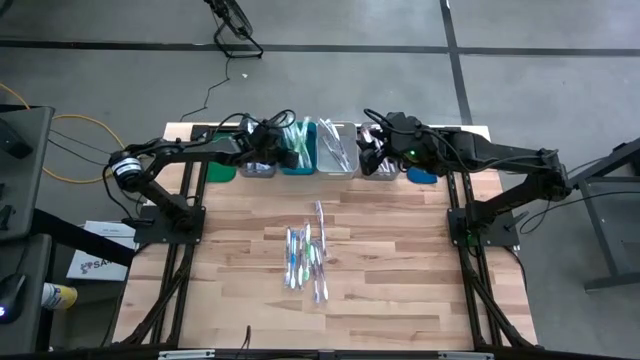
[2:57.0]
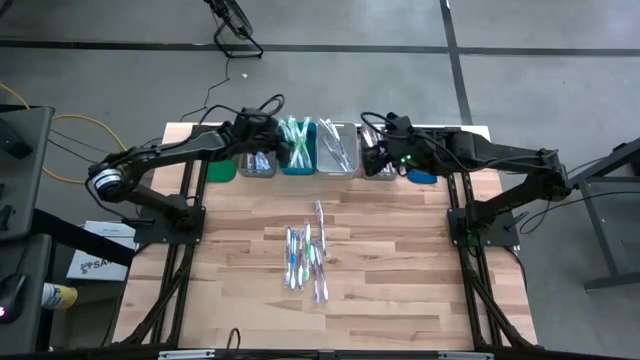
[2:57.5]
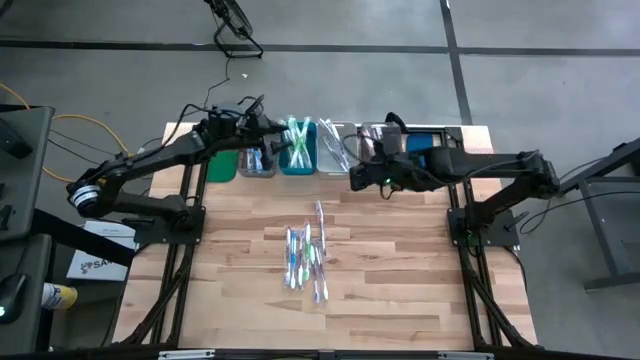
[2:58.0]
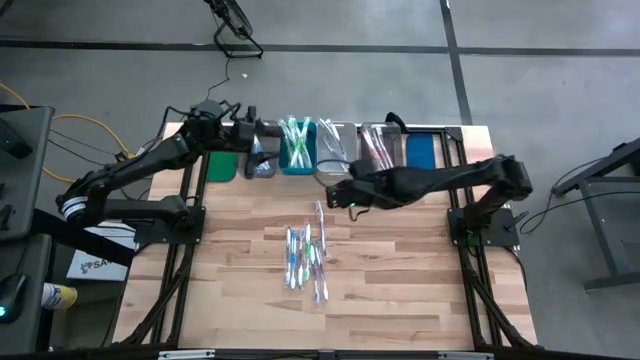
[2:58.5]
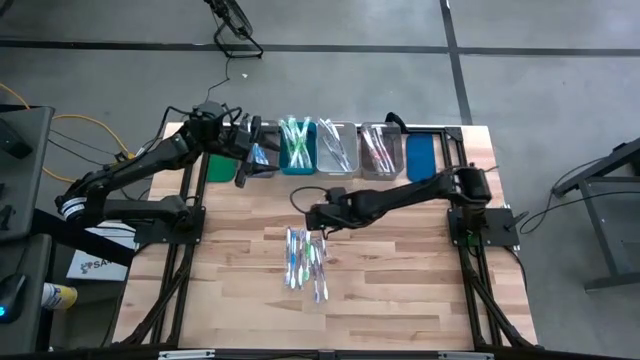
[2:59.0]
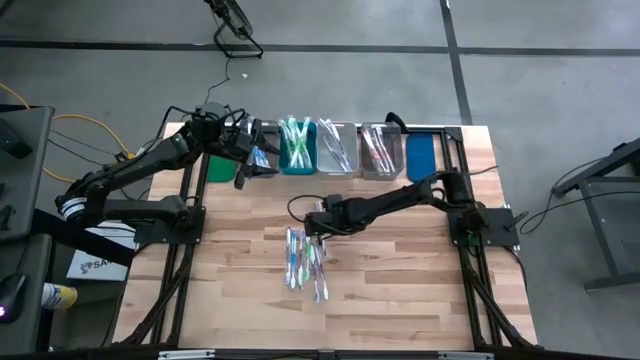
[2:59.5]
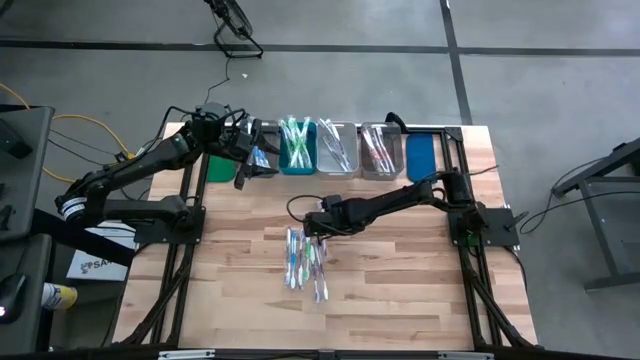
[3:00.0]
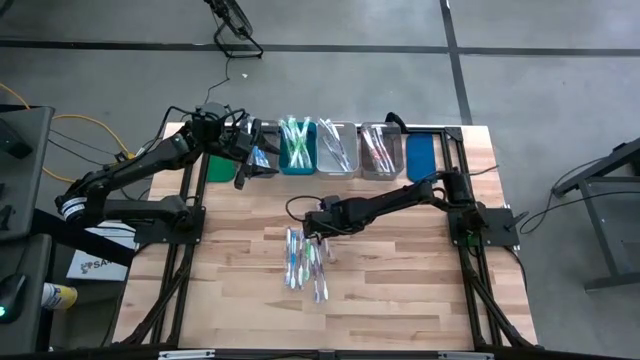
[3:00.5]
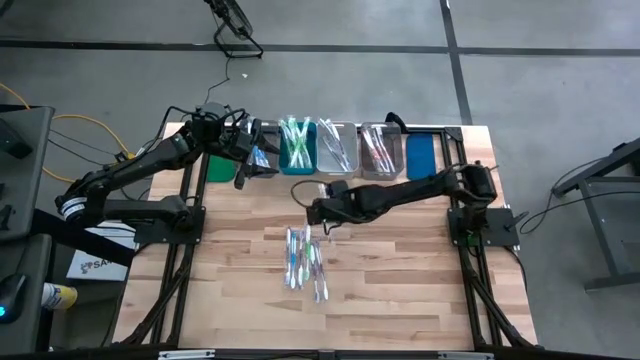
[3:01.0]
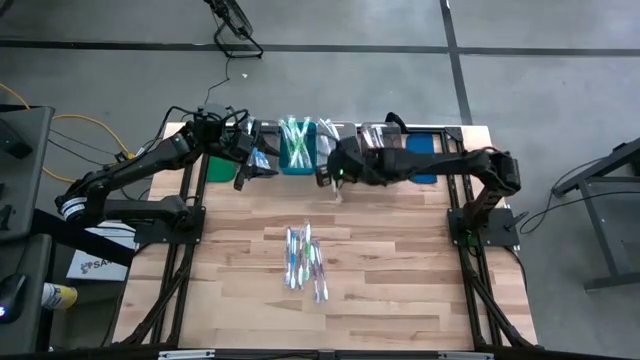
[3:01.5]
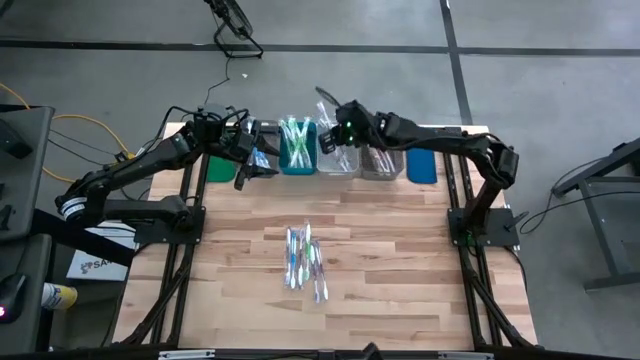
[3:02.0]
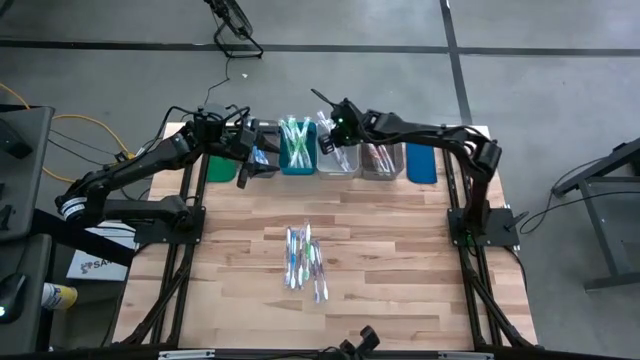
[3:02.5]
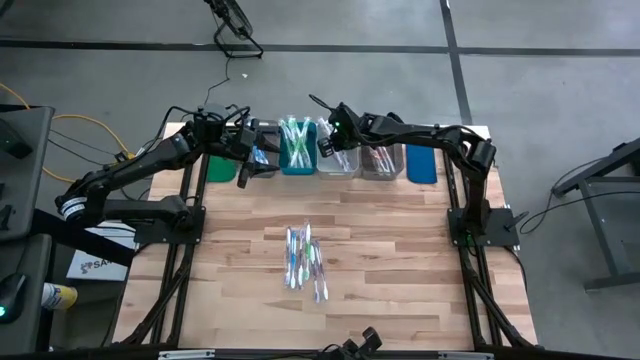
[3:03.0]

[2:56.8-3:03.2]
Task: Pick & Place Toothbrushes
Put the purple toothbrush into the white bin

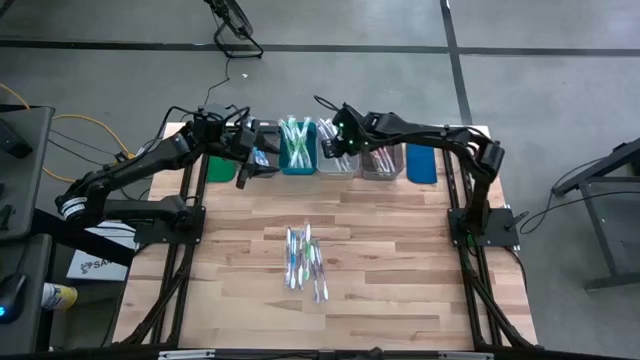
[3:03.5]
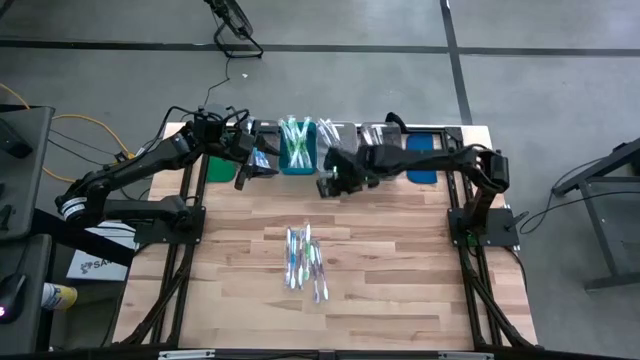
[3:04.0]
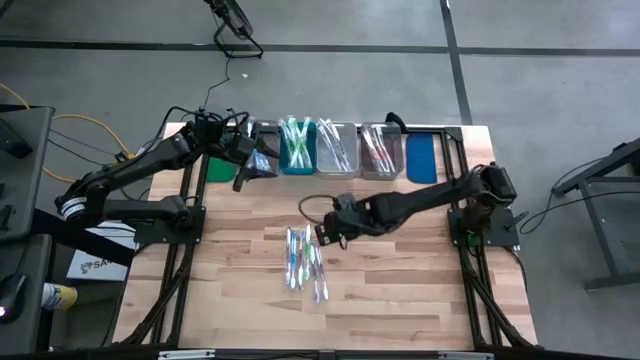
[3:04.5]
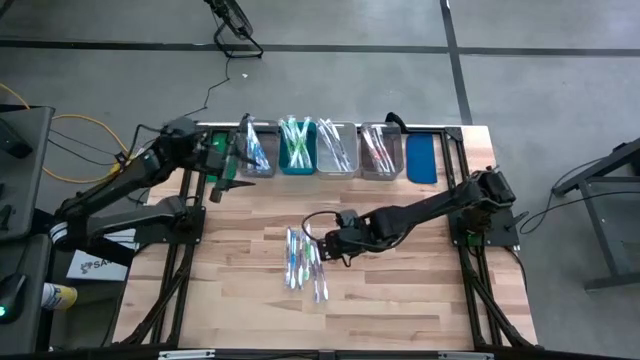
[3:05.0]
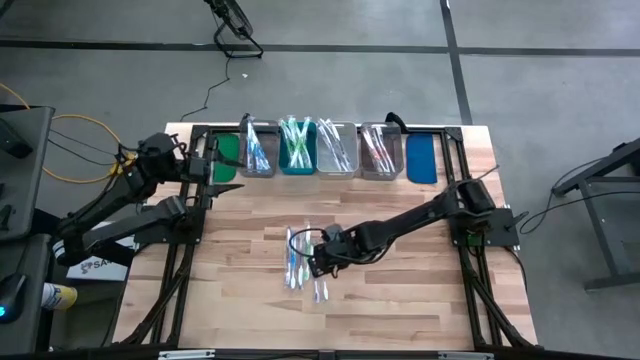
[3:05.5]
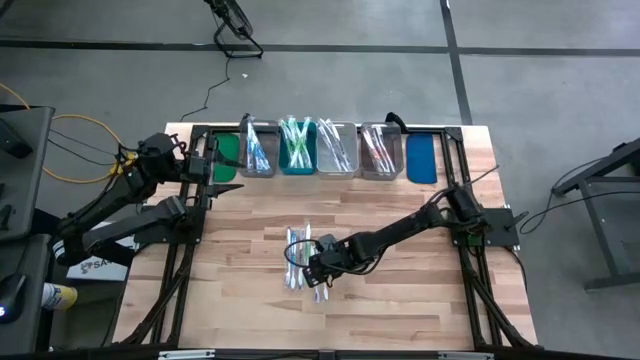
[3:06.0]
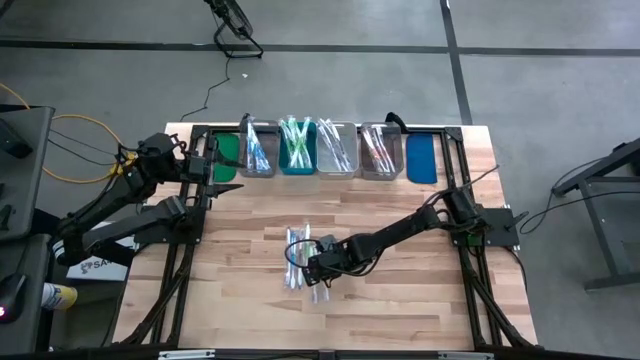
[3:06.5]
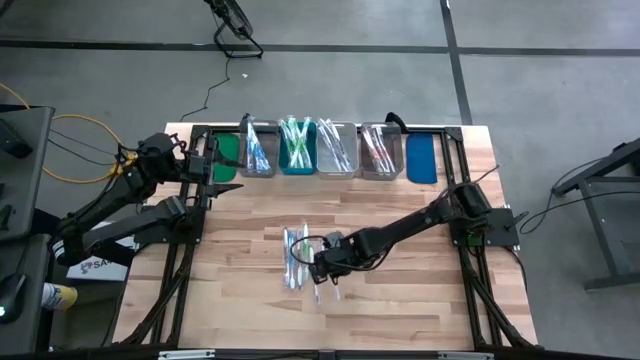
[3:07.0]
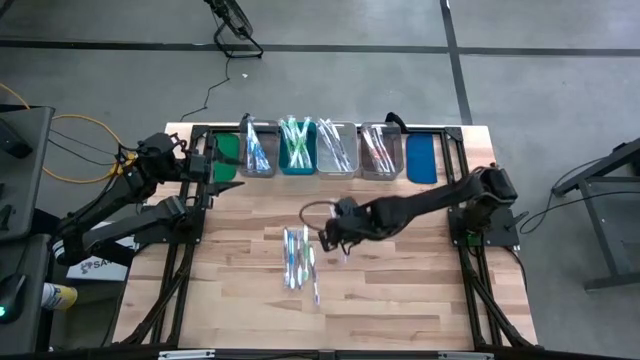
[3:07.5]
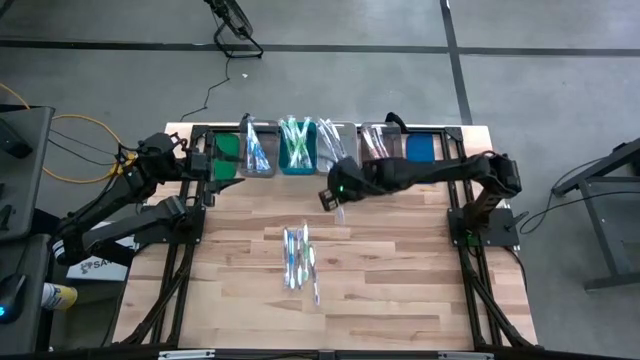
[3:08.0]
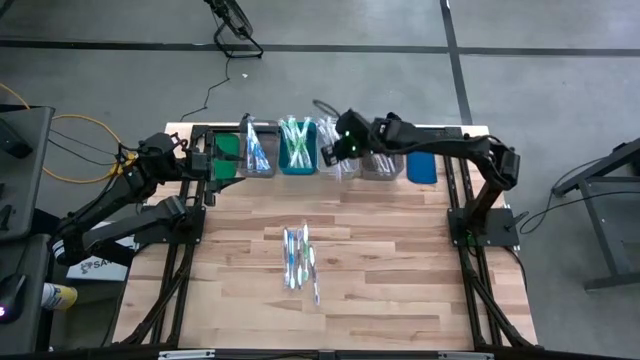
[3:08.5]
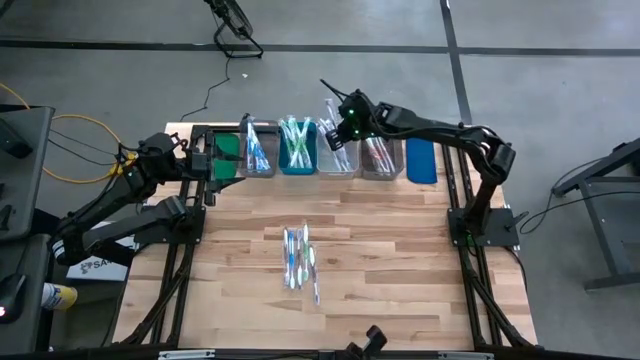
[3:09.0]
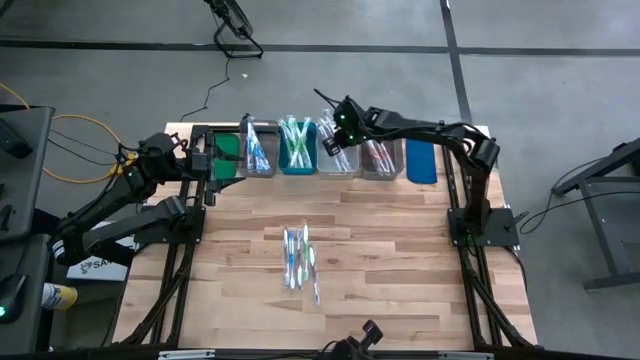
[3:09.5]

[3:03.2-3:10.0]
Put the purple toothbrush into the white bin

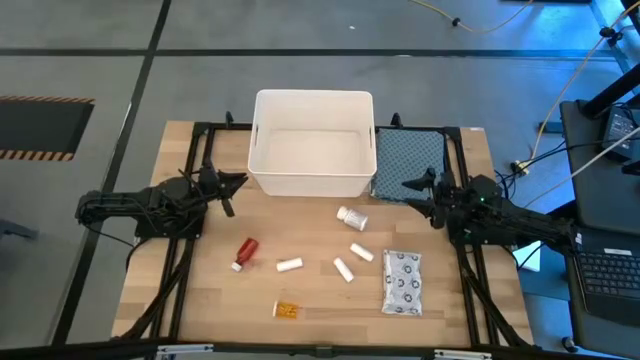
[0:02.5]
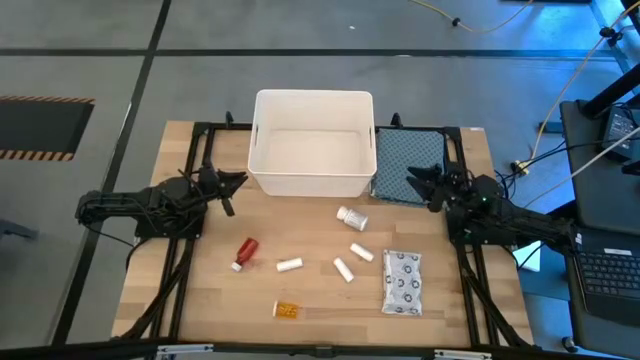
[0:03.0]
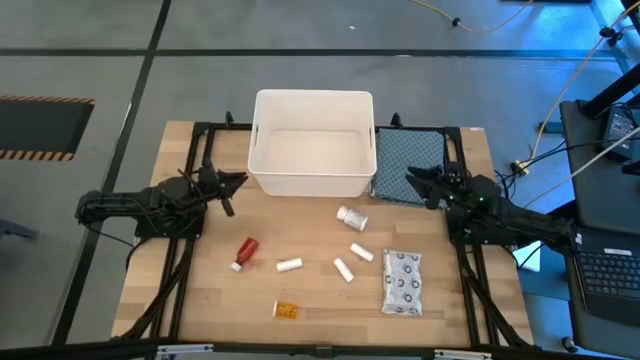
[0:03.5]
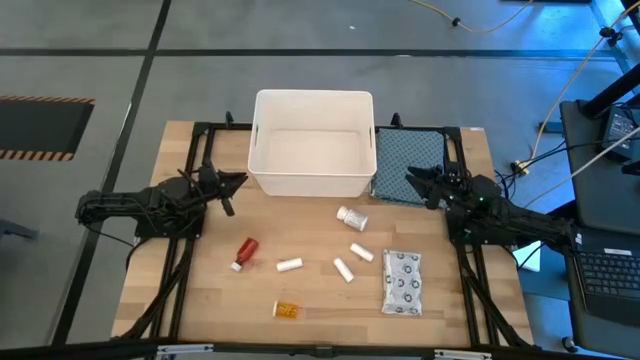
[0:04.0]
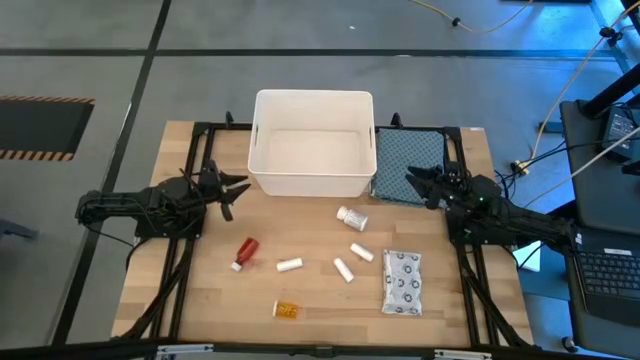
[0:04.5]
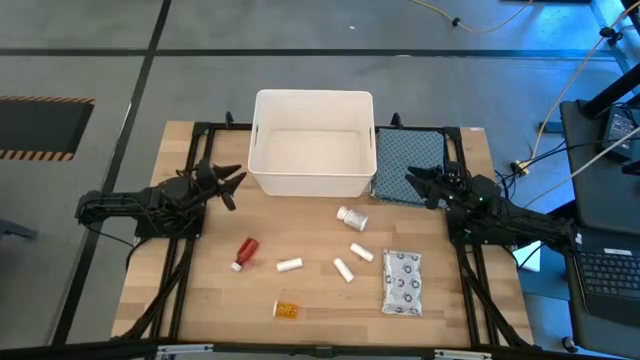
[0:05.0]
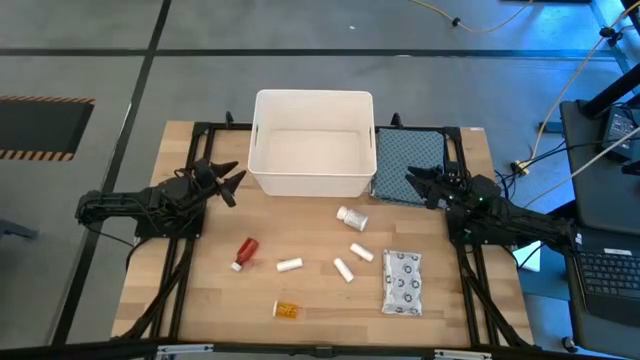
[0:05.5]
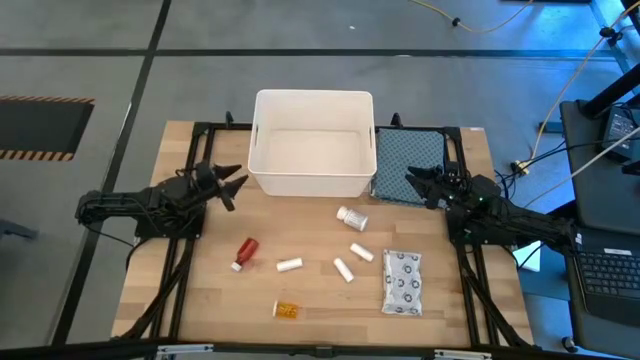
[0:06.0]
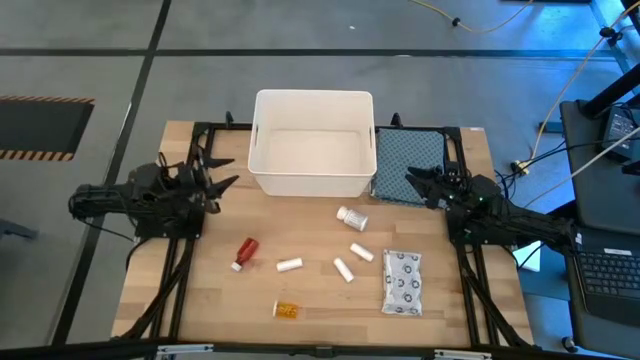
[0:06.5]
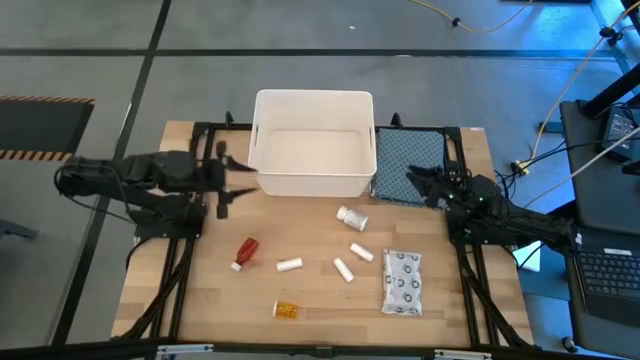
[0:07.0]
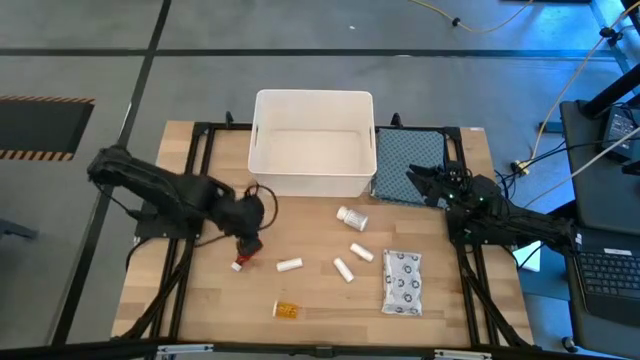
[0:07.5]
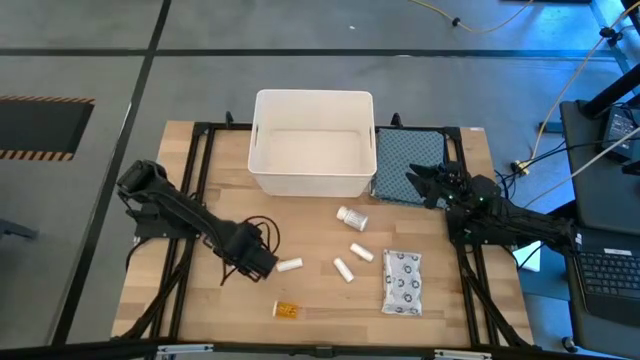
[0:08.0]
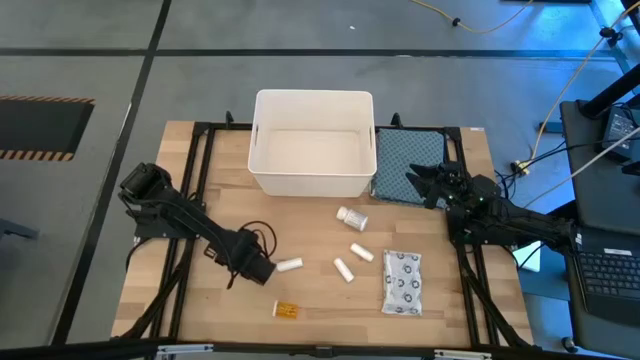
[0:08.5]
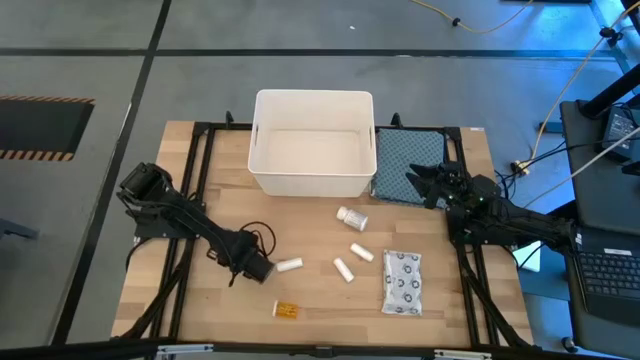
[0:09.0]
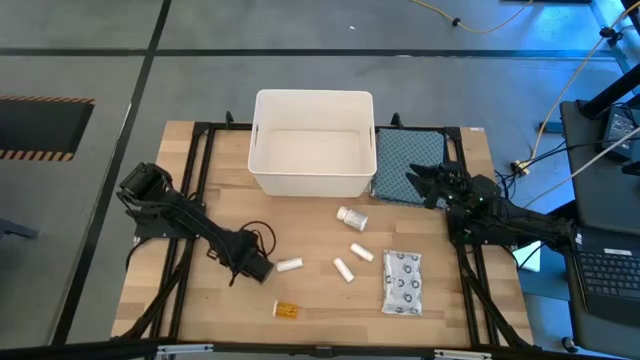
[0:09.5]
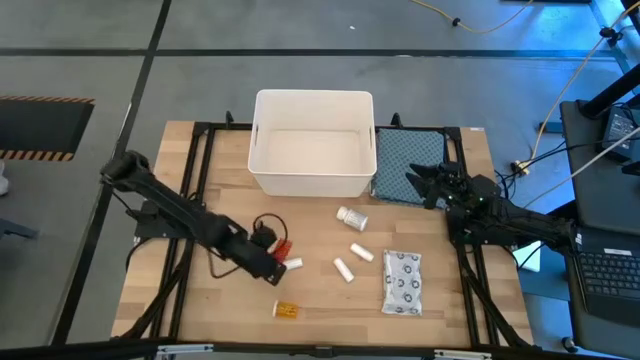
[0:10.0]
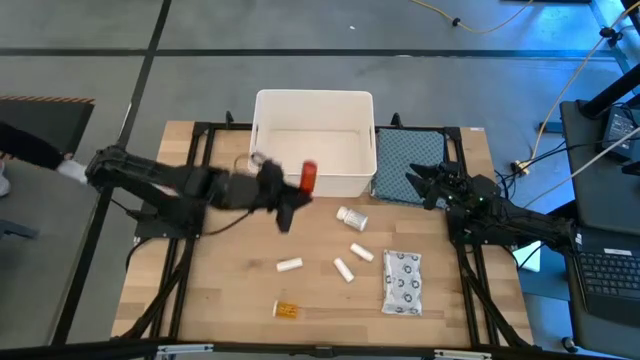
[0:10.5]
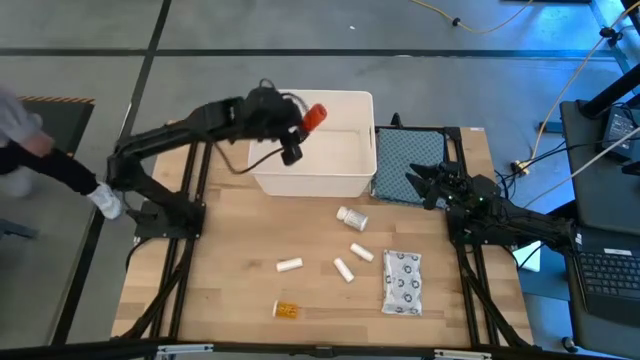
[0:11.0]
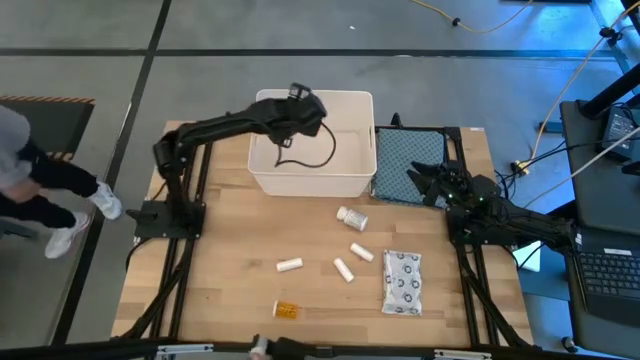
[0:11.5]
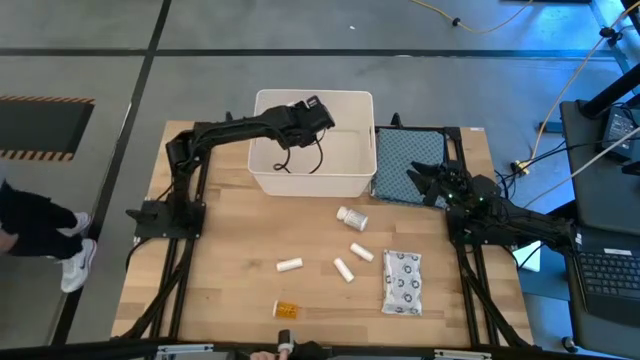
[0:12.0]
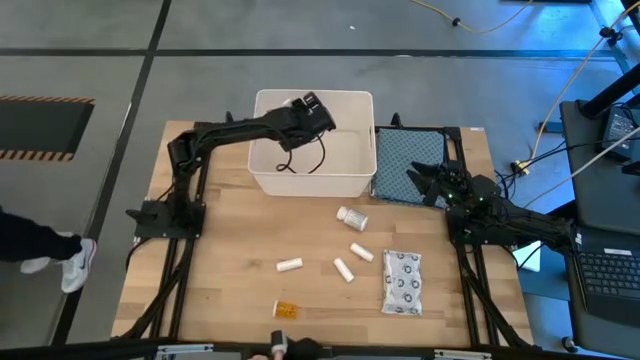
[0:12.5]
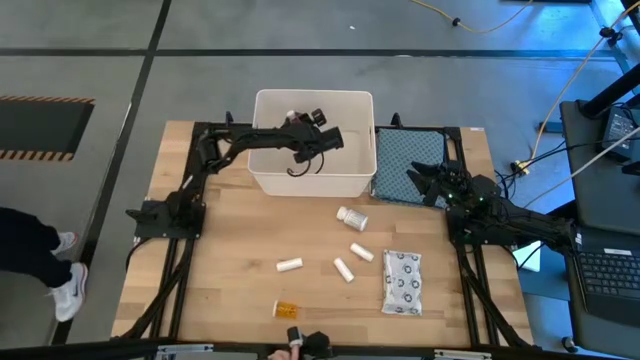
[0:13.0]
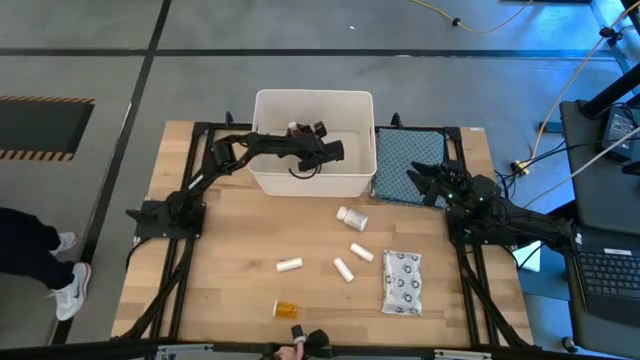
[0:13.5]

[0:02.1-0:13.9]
Task: Pick & place medical supplies in basket/bin
Put the red medicine bottle into the white bin
